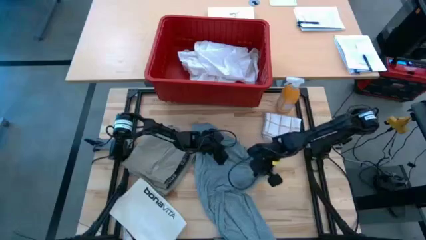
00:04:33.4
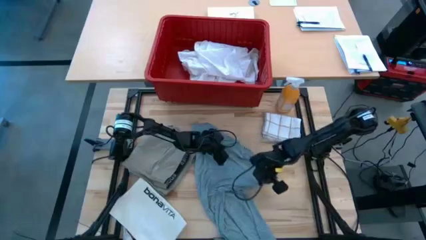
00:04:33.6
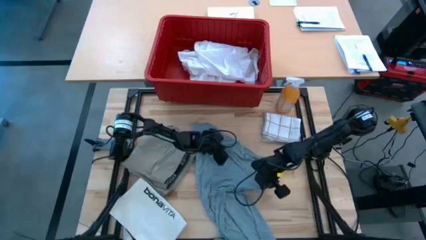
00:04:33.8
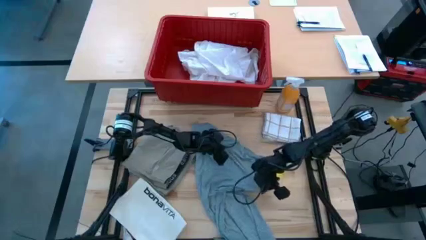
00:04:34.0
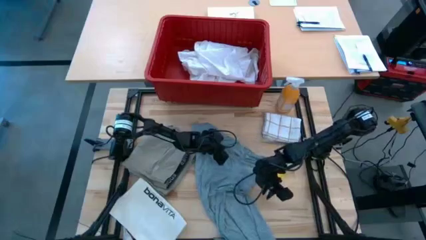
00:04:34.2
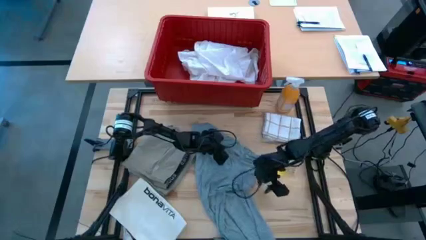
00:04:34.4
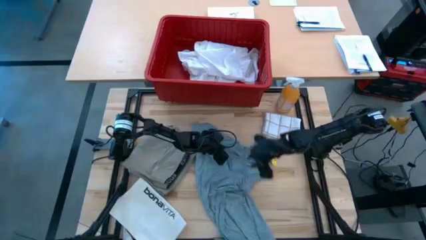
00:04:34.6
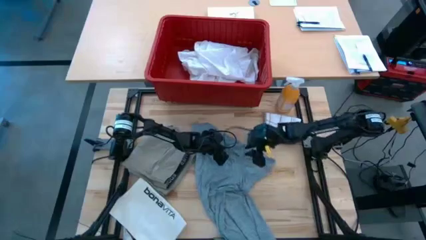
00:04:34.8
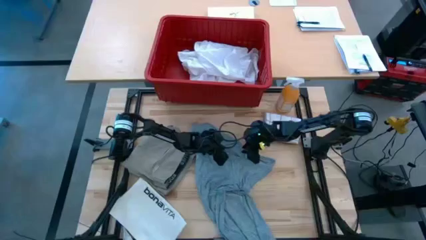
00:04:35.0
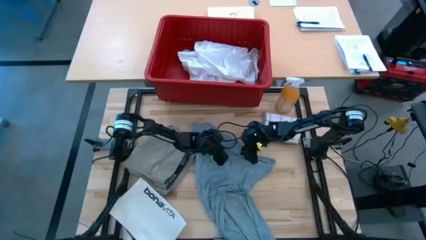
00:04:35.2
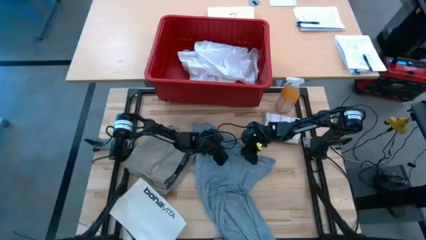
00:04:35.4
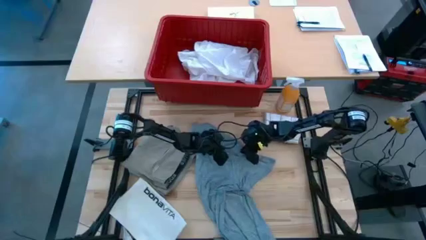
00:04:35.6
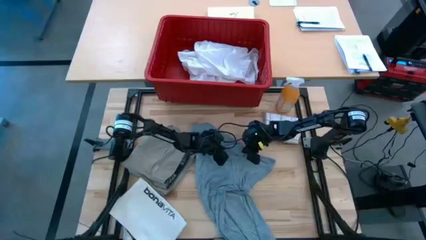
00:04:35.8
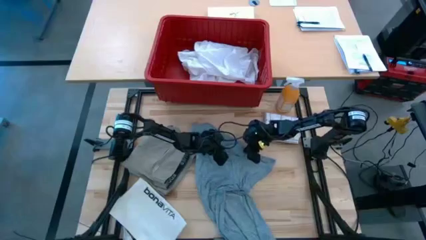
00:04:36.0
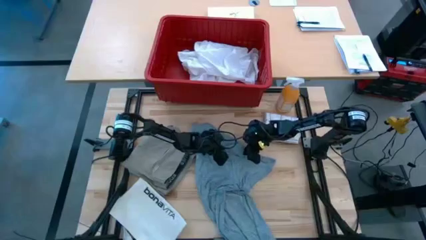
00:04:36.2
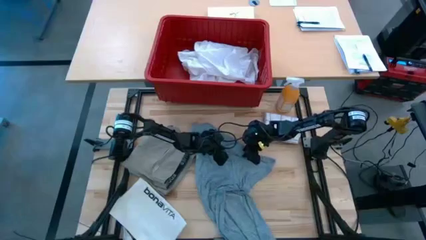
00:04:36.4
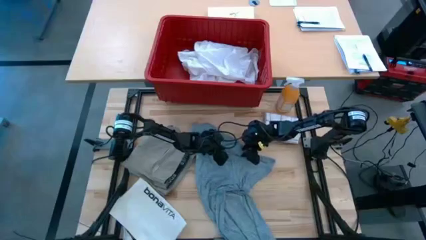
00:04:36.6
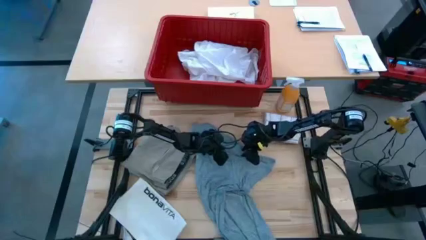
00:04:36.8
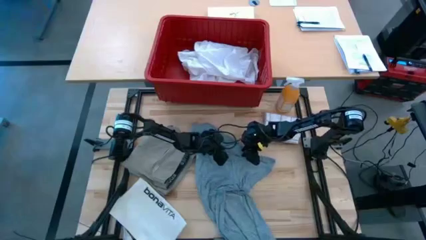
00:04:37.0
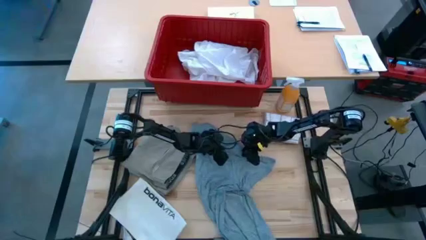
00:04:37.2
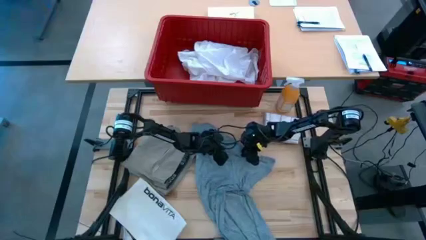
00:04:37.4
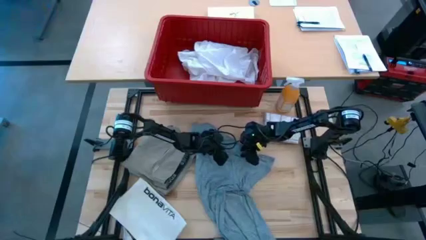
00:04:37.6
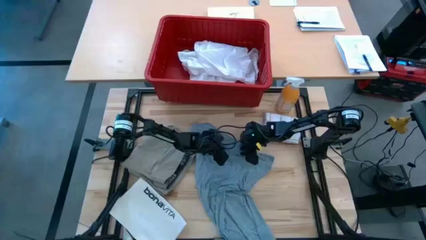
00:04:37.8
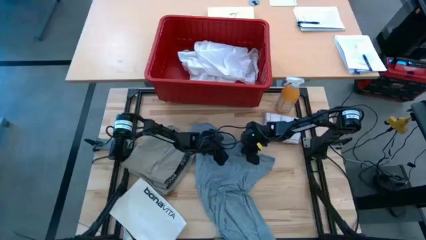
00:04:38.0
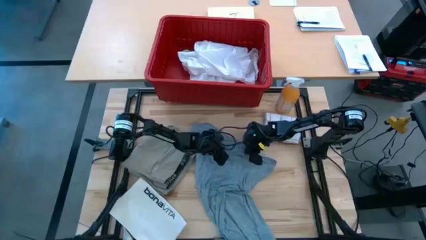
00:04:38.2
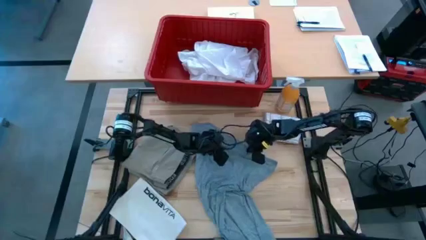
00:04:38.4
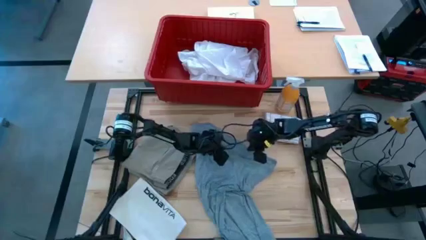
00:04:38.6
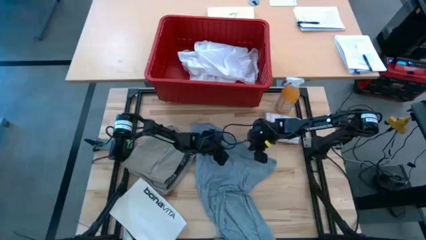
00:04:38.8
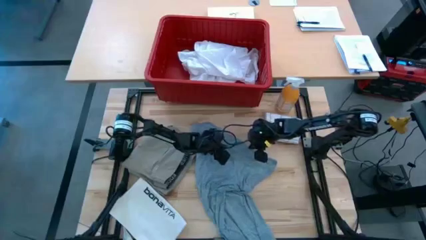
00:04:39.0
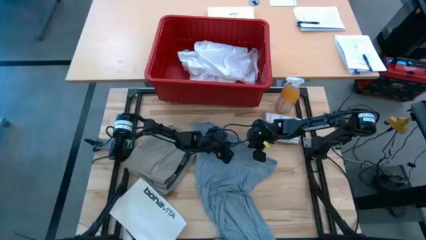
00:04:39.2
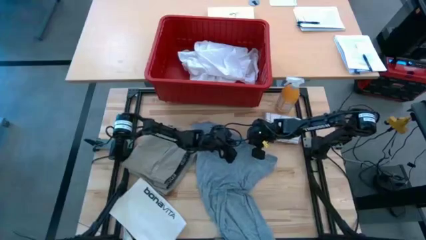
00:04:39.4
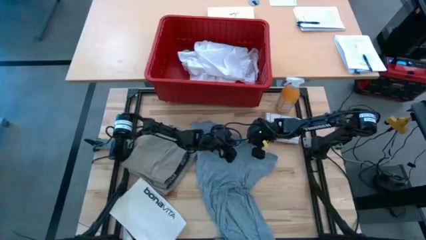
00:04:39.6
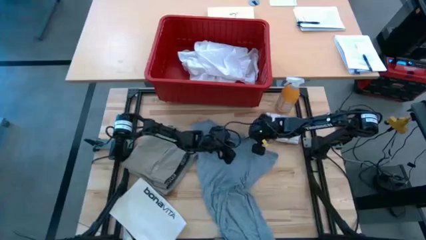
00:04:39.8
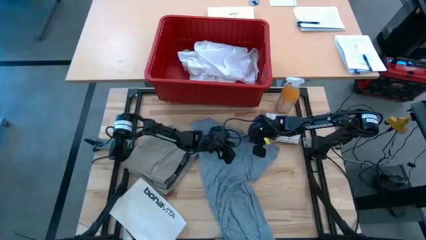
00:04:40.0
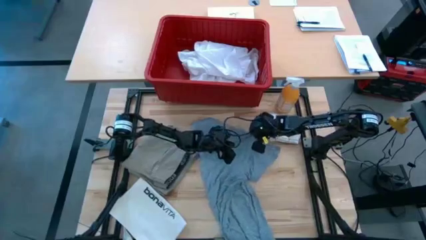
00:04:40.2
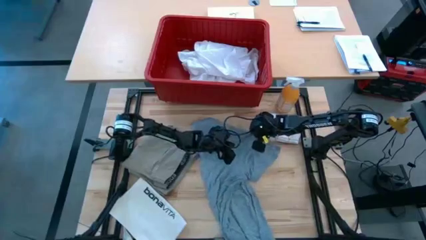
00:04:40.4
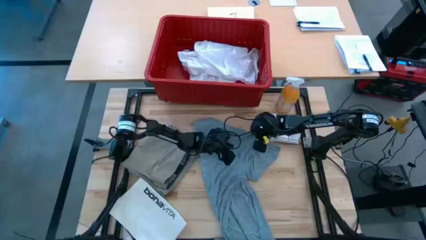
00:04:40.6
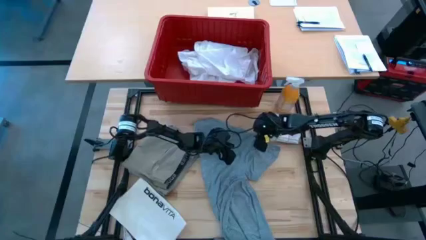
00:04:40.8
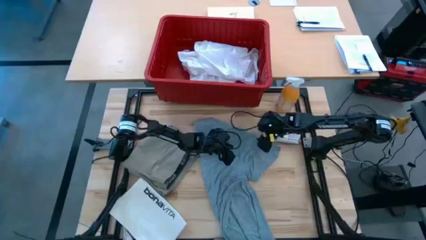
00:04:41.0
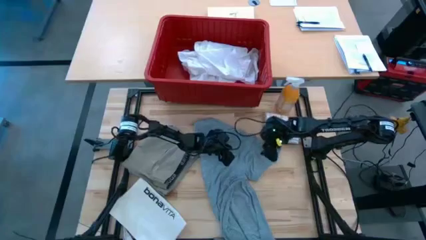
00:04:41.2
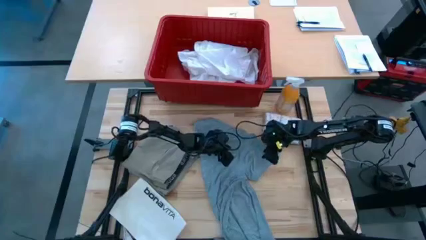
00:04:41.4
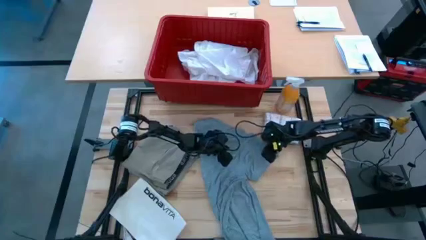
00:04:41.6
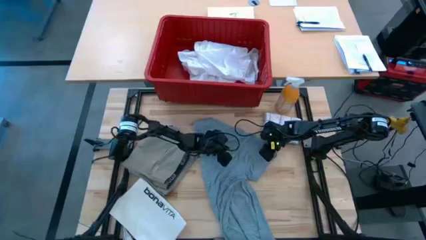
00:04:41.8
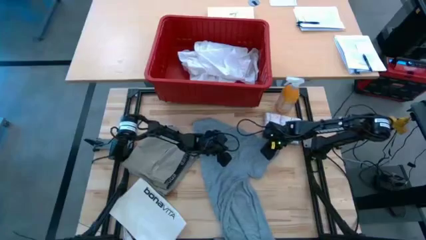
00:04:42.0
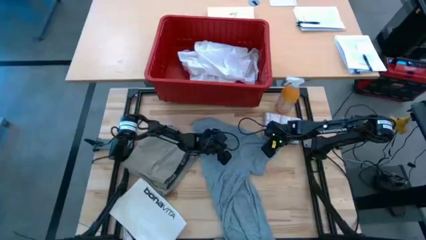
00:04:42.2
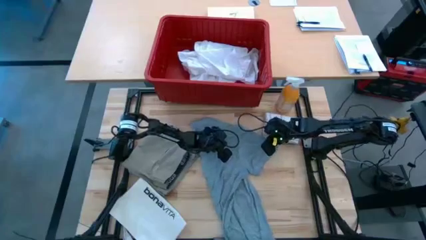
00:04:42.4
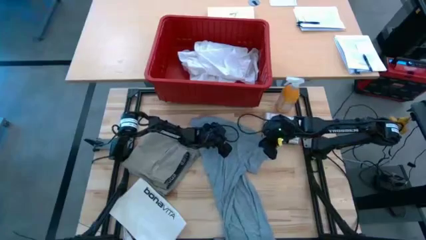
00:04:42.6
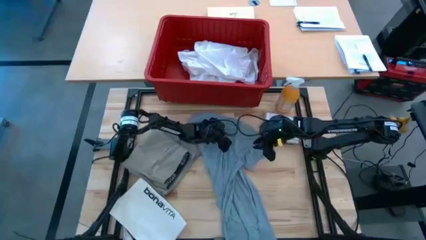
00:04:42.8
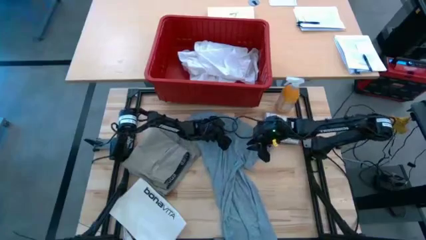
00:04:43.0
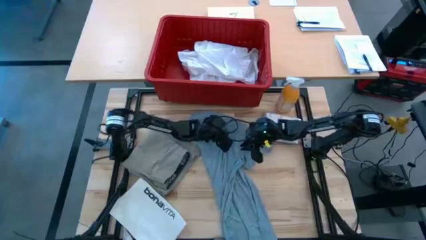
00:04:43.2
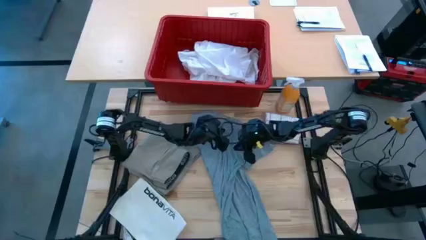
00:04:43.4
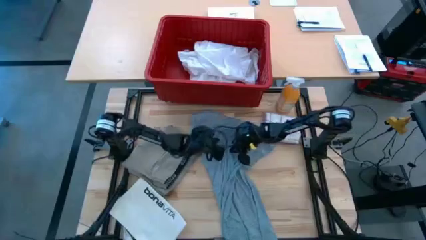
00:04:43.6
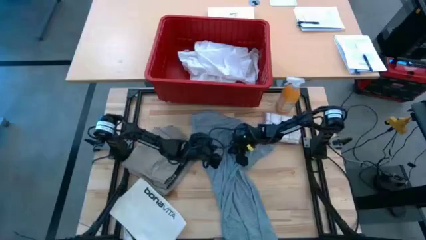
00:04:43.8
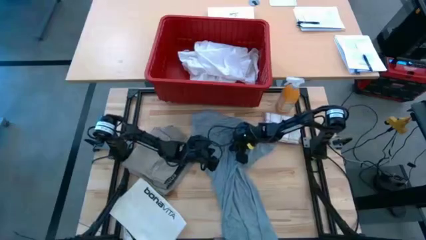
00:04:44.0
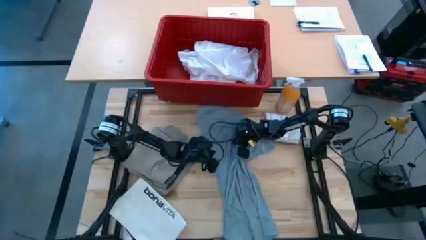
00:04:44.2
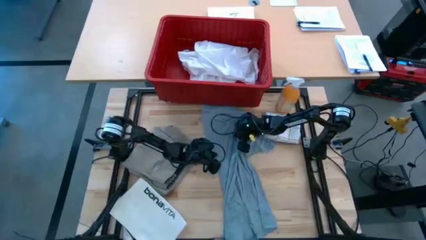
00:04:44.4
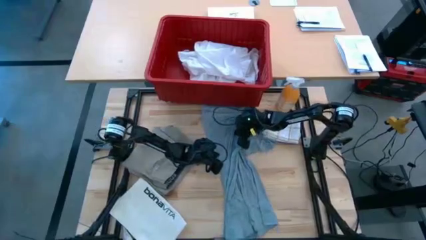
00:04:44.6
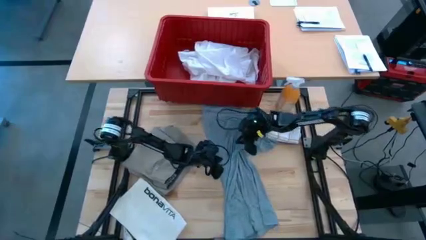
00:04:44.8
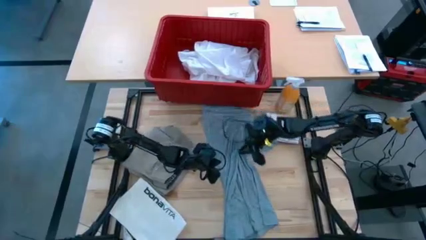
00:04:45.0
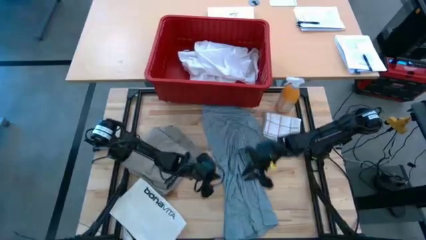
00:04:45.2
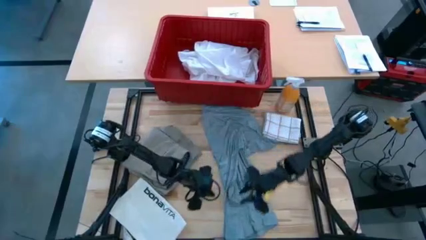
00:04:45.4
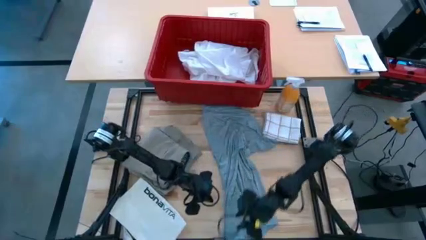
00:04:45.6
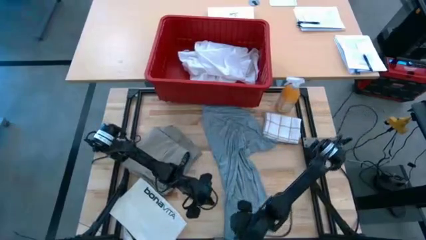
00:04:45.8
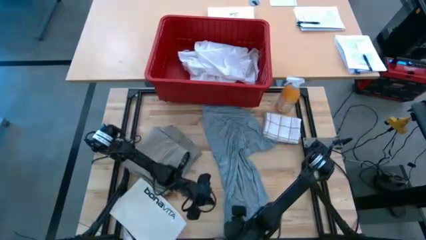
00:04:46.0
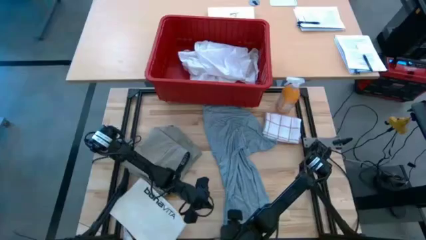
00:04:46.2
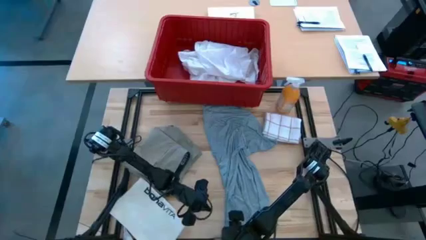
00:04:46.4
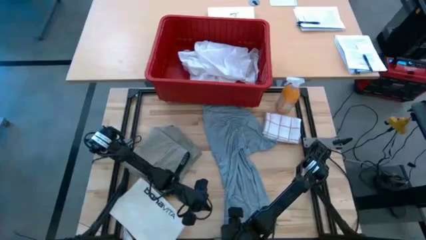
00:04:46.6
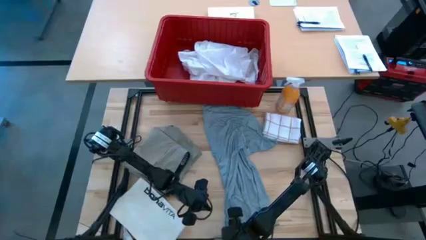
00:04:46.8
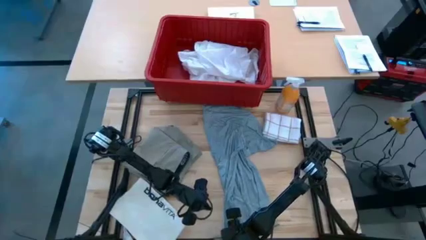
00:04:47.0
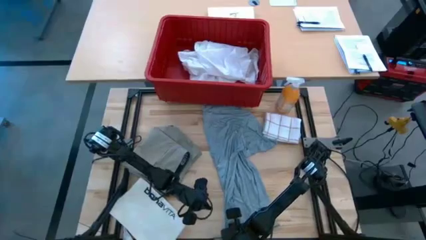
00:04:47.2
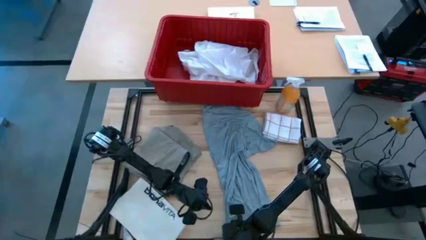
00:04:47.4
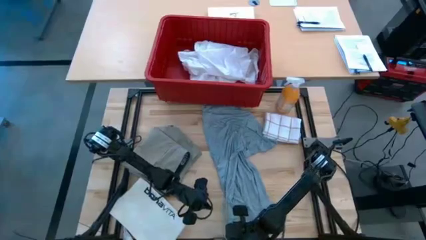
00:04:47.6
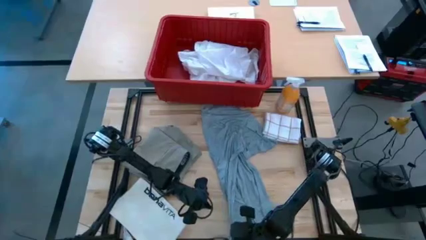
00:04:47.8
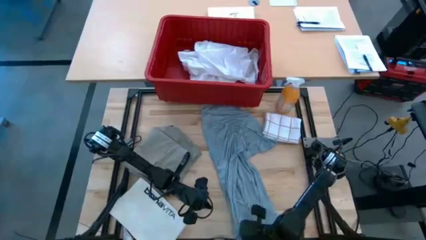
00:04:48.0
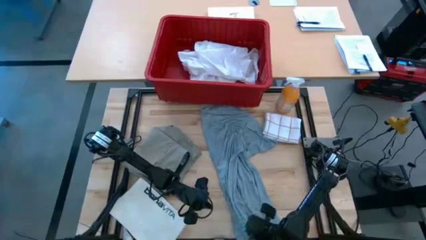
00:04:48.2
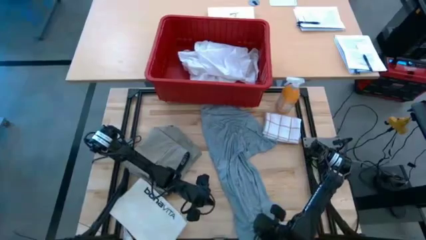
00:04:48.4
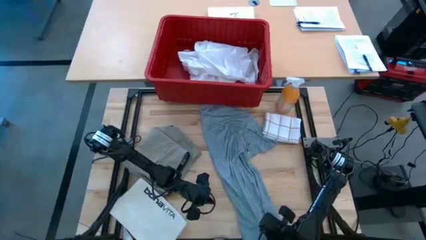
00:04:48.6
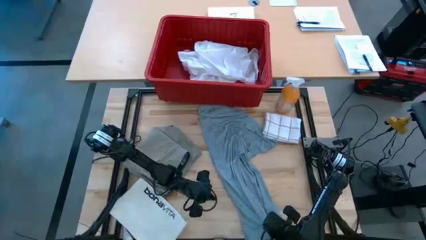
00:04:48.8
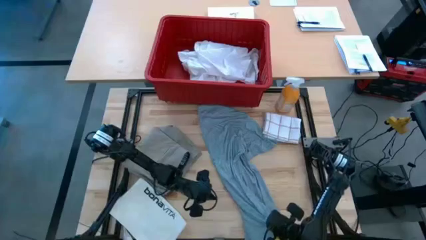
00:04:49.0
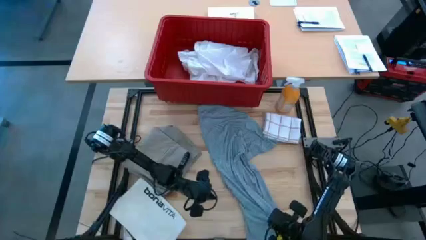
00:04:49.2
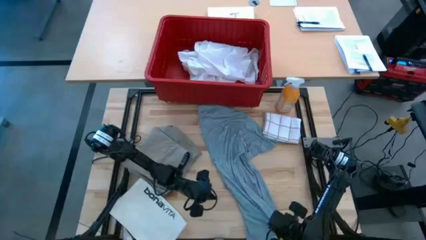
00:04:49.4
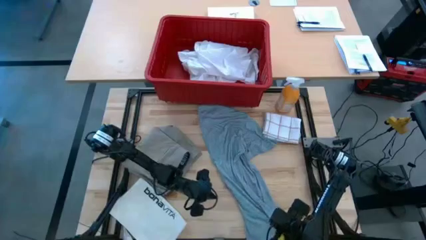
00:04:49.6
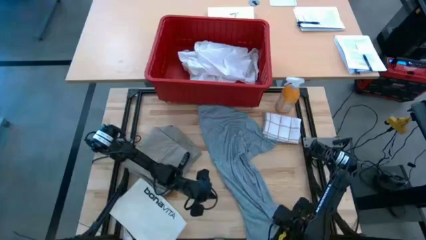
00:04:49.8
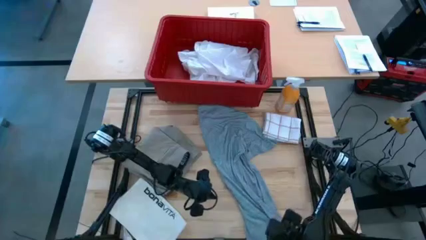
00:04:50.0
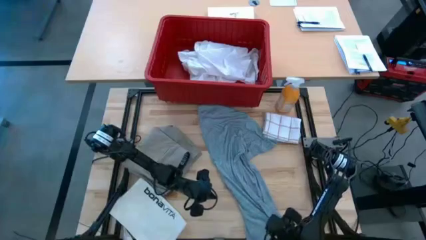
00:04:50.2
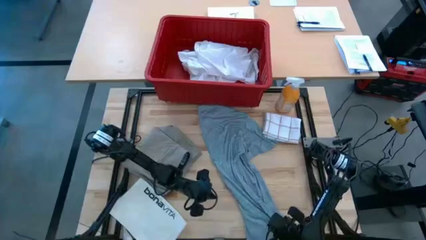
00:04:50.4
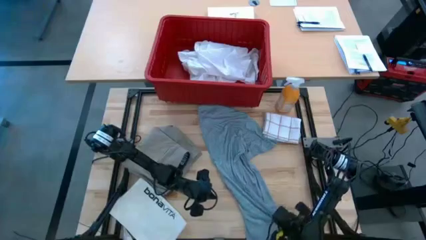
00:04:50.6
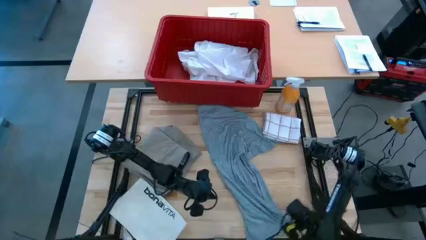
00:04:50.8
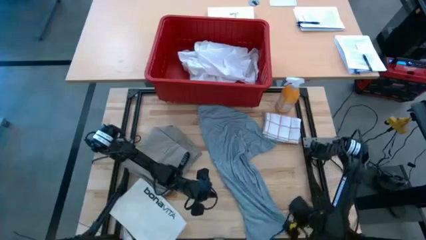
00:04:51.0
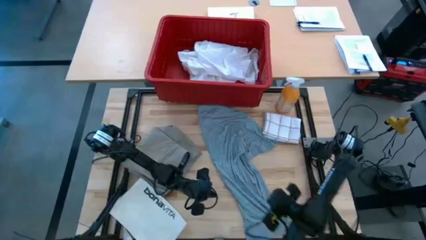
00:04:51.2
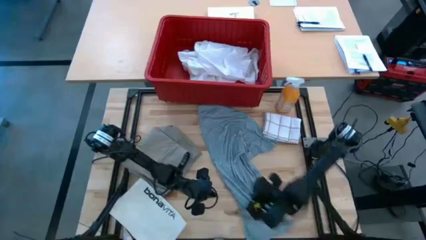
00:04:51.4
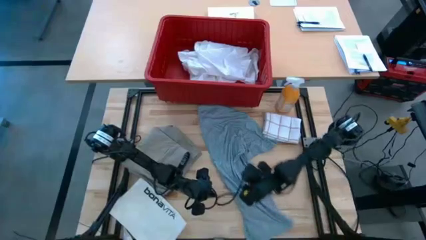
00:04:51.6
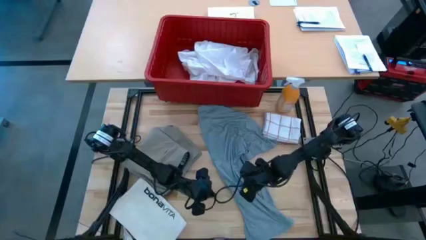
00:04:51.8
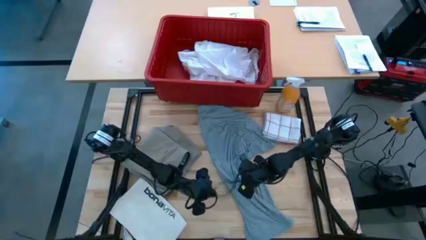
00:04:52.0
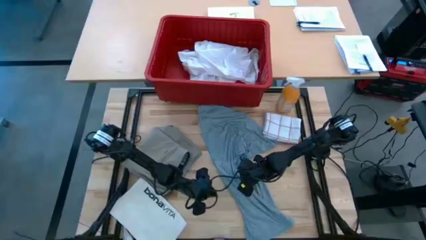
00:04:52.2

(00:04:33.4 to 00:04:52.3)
Task: Fold laundry
Fold the gray shirt
